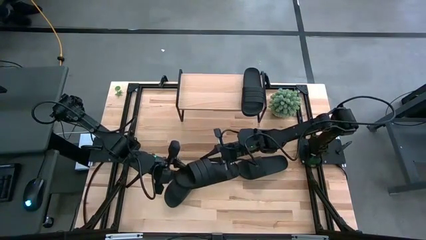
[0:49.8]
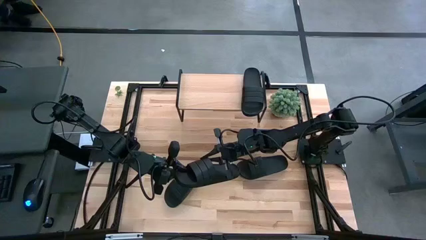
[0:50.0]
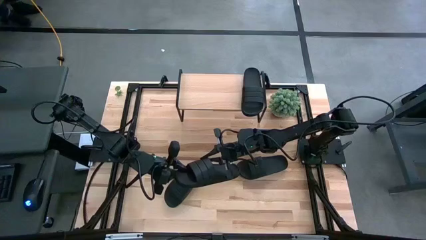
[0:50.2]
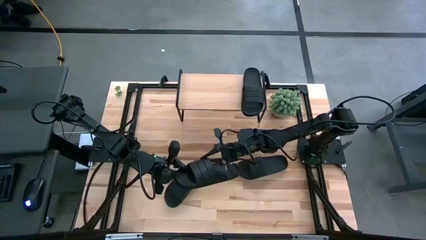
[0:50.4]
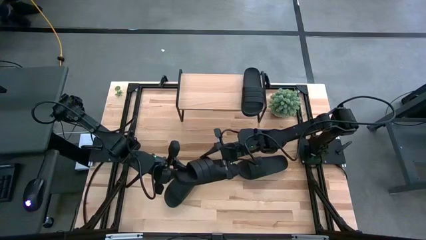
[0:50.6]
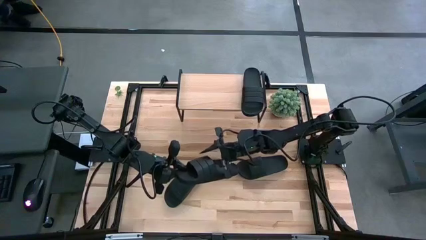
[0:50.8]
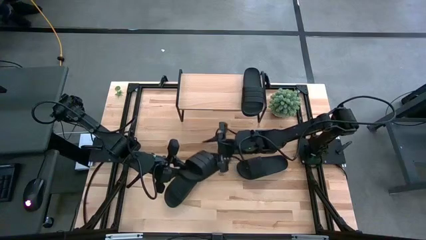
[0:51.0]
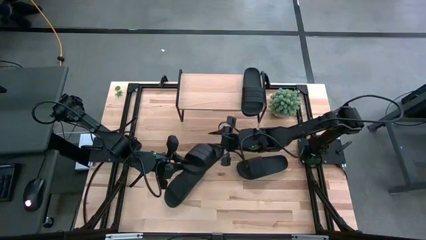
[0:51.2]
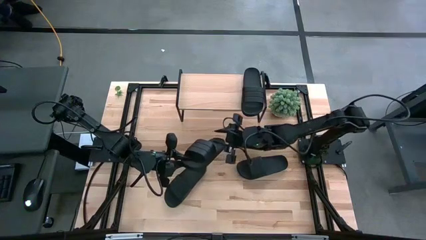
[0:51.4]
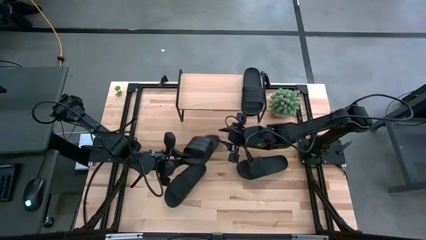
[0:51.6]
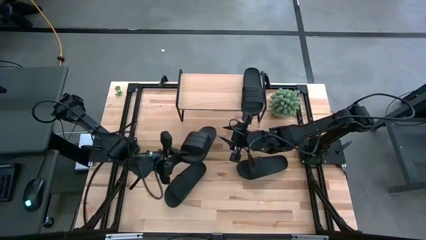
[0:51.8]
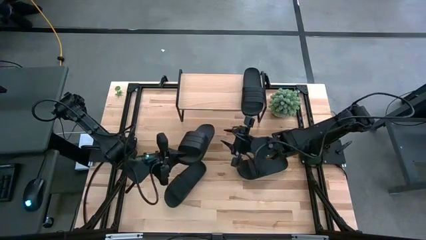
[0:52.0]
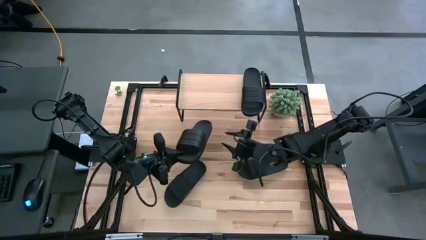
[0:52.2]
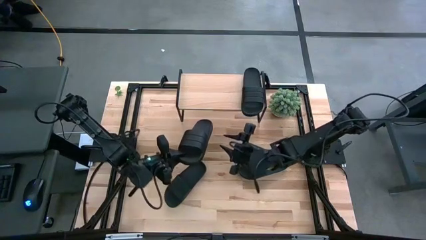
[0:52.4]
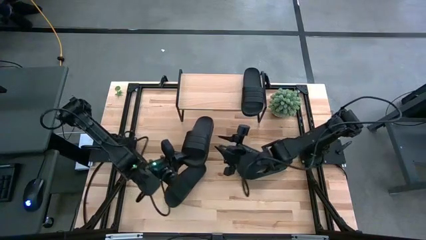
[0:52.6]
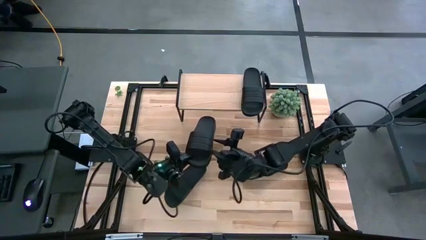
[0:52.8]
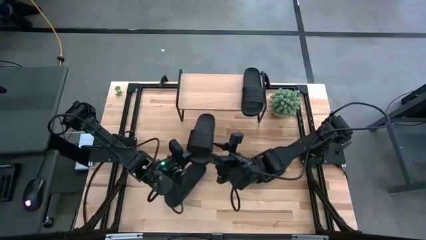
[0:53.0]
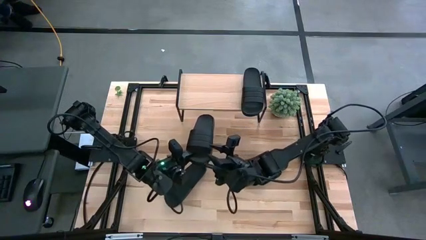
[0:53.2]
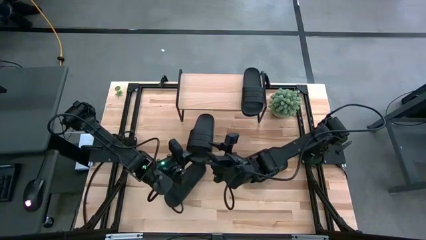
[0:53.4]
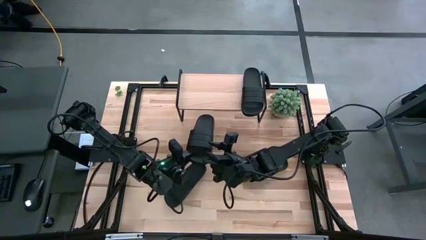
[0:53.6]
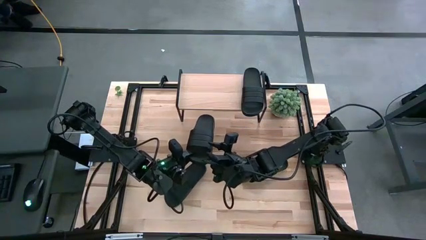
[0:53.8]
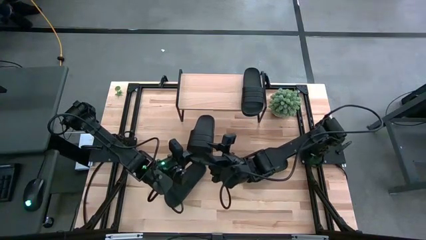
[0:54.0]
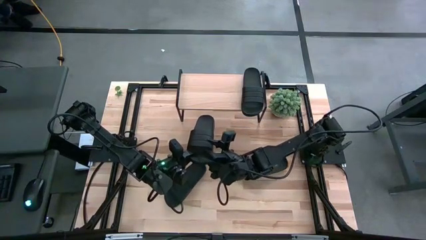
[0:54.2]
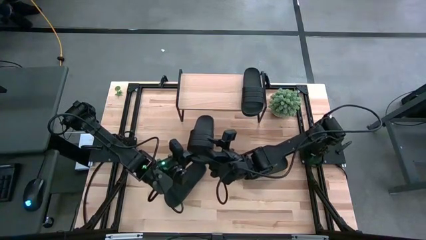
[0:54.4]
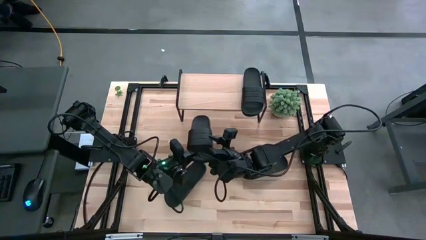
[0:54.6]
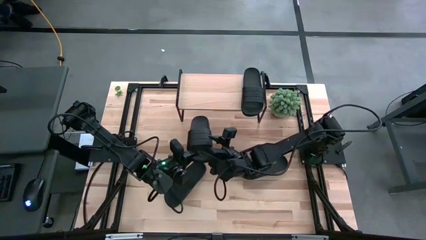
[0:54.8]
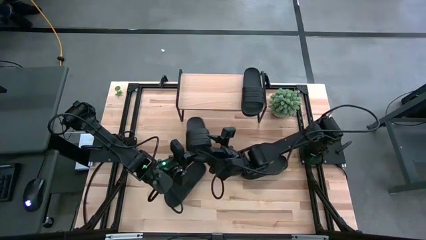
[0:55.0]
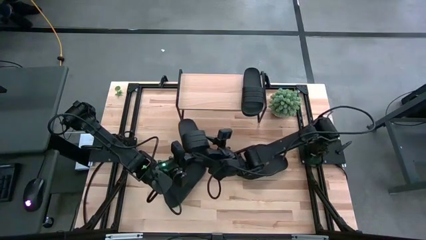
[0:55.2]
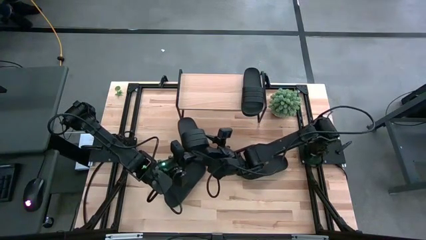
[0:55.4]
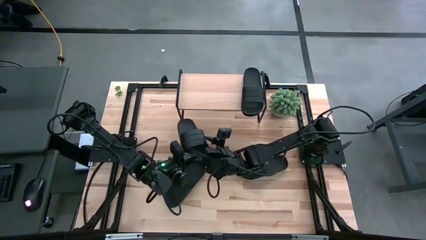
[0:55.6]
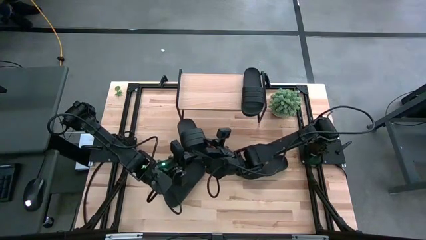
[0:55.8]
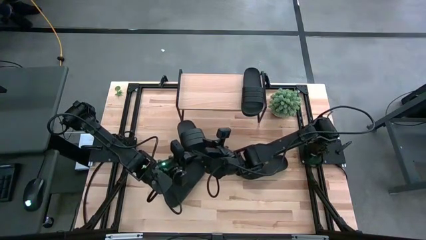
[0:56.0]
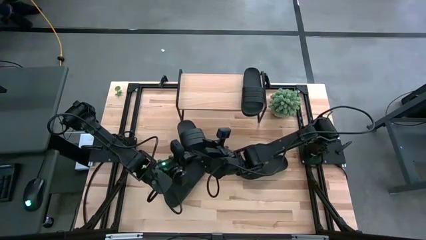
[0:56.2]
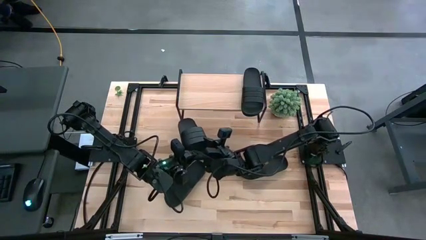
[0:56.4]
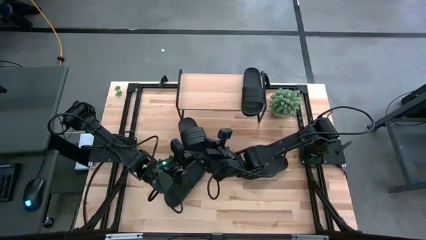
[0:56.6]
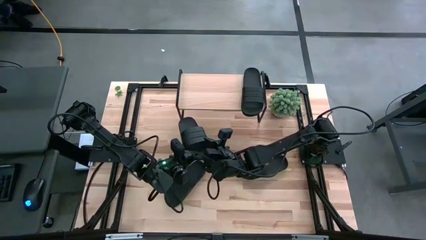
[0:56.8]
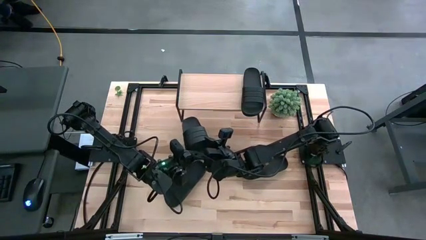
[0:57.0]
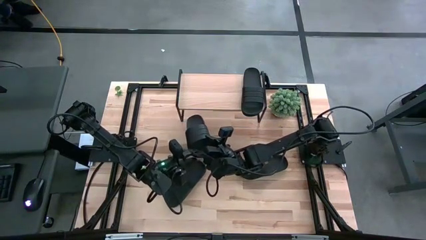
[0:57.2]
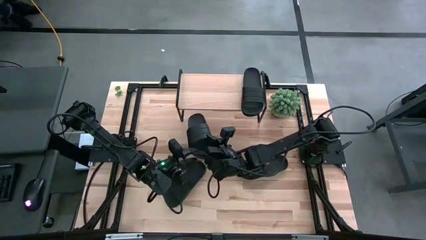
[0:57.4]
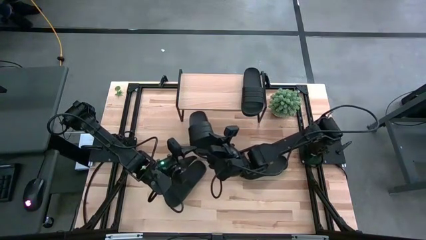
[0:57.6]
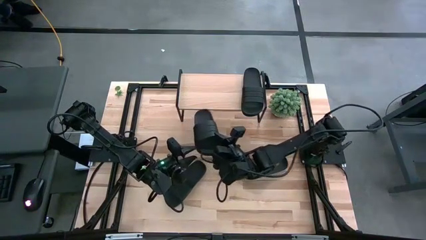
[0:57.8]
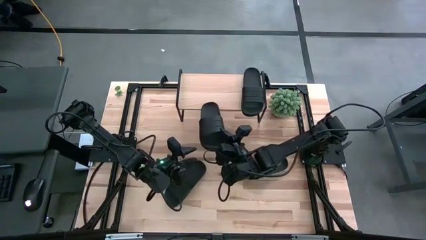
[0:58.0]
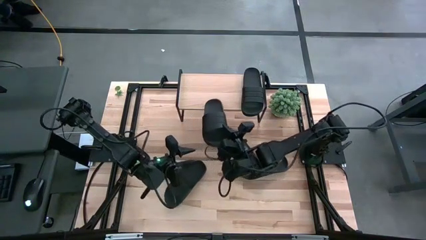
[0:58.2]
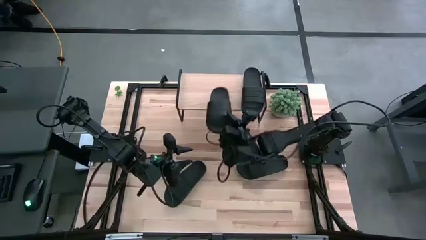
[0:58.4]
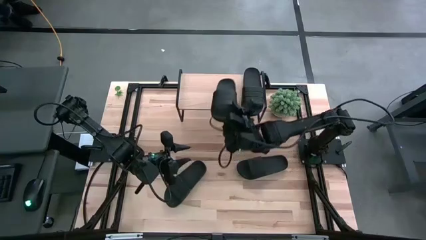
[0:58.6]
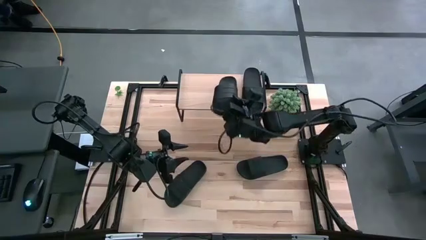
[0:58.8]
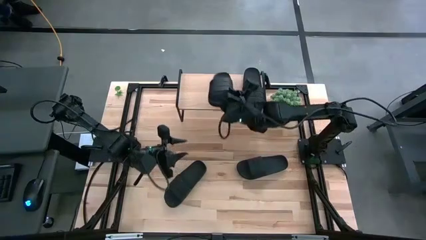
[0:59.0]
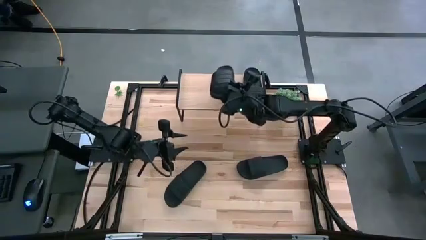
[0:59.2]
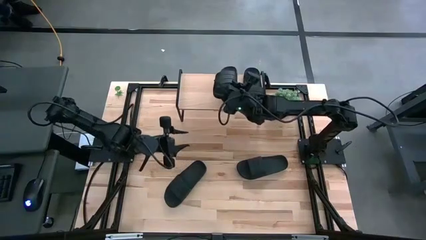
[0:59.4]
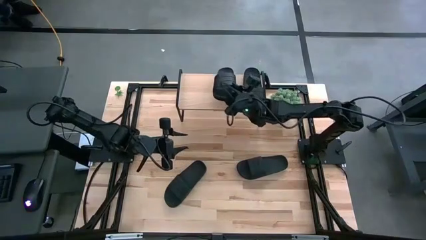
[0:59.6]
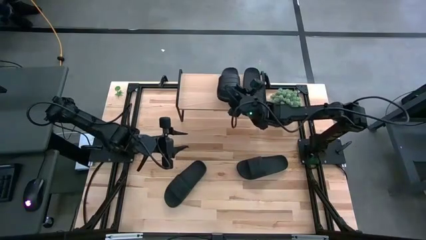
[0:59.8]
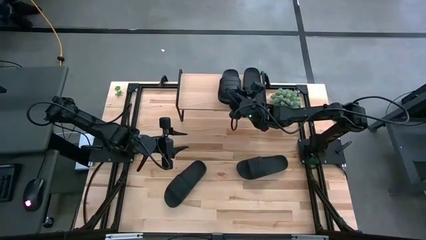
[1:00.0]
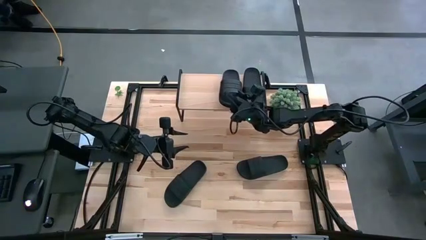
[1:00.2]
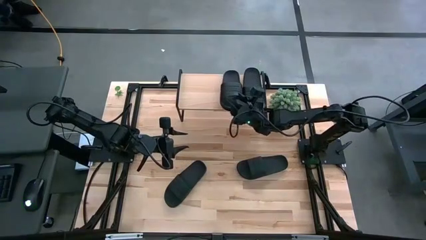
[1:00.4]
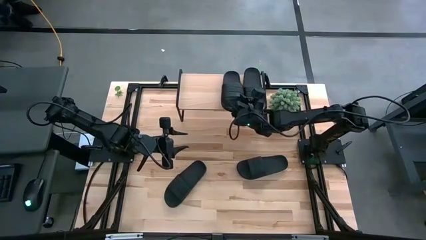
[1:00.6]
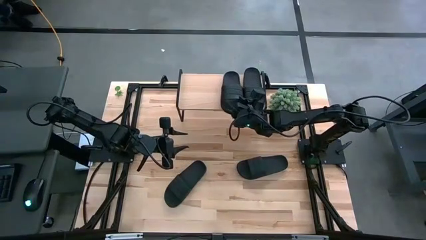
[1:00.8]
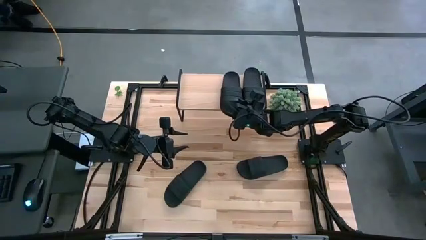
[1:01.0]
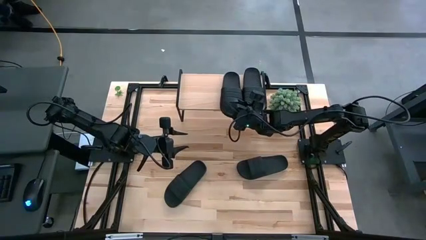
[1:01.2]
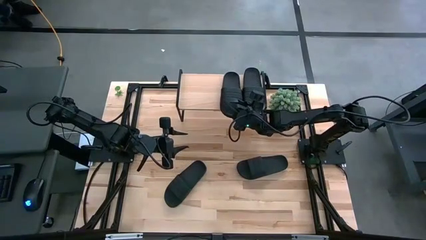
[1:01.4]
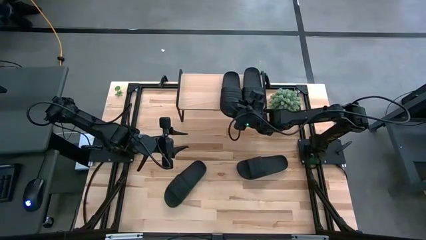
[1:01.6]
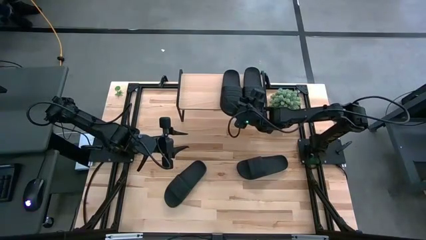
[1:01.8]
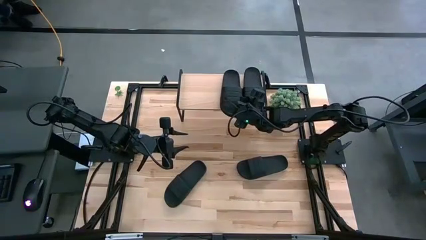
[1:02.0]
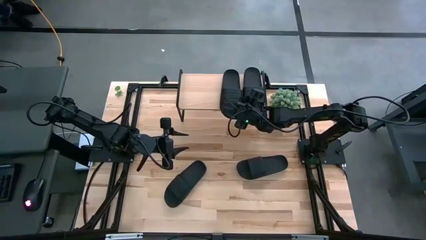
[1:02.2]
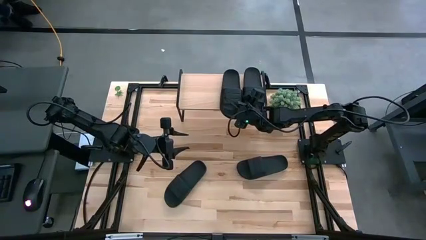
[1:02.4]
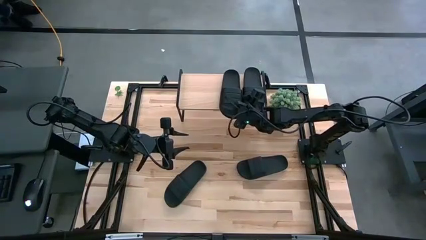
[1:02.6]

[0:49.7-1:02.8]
Task: Pick and place slides into the shelf
Put the black slipper on the shelf

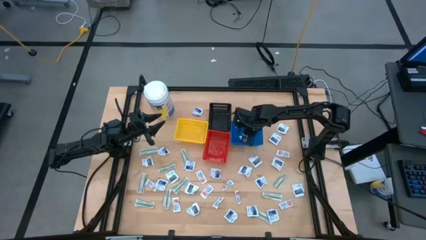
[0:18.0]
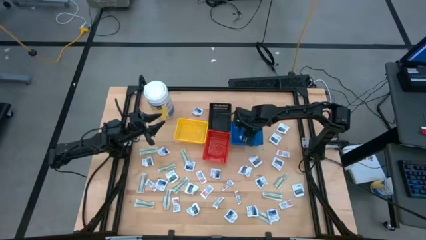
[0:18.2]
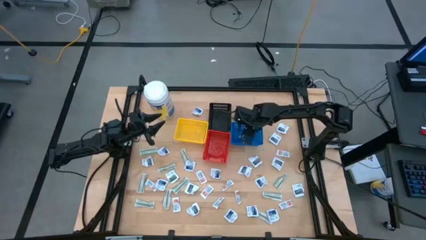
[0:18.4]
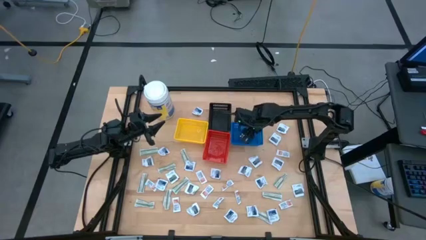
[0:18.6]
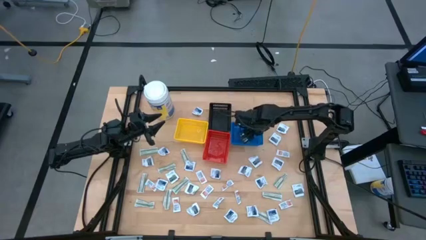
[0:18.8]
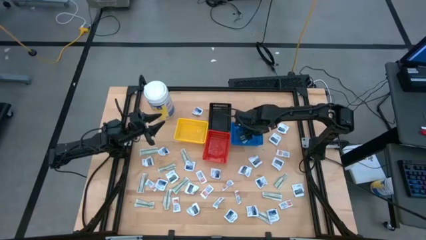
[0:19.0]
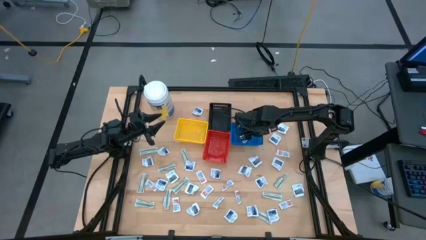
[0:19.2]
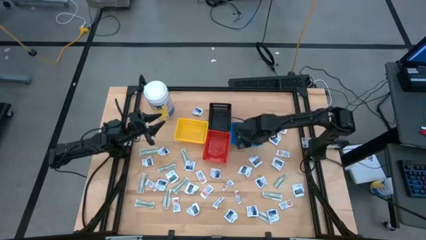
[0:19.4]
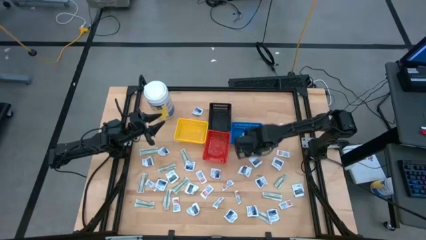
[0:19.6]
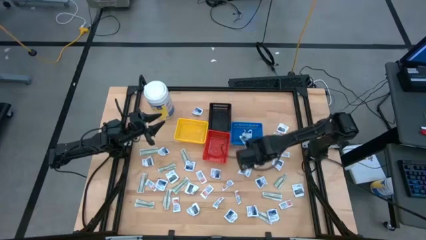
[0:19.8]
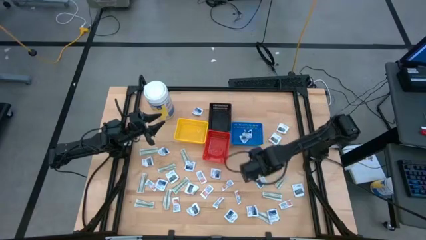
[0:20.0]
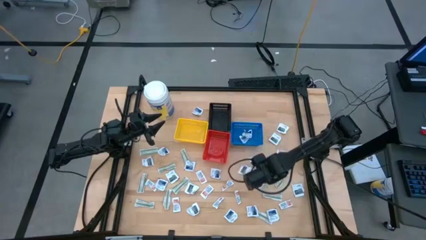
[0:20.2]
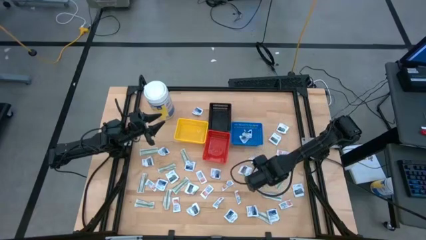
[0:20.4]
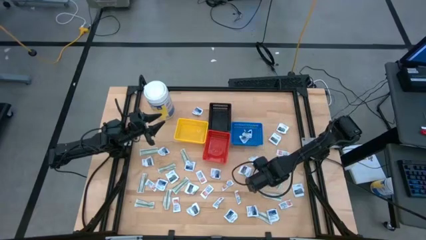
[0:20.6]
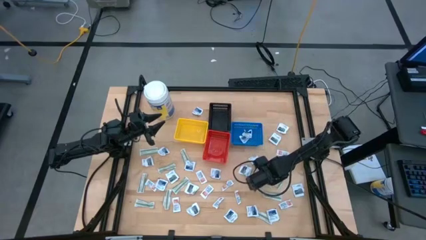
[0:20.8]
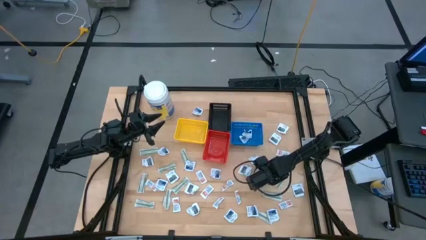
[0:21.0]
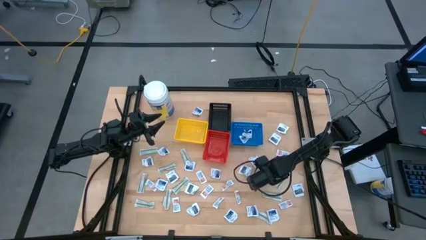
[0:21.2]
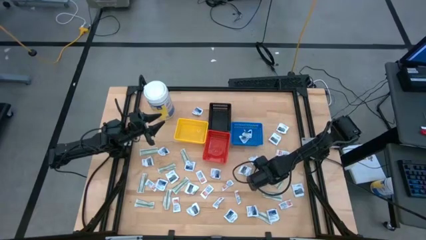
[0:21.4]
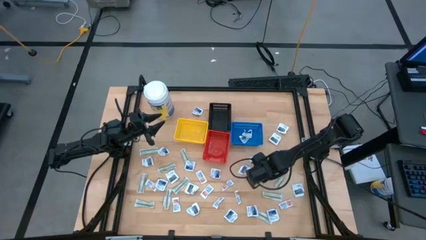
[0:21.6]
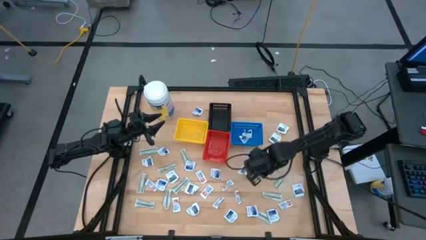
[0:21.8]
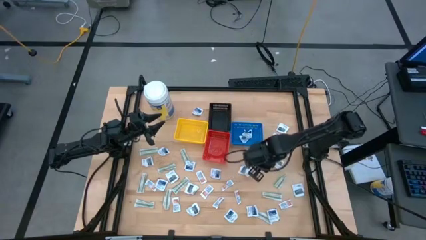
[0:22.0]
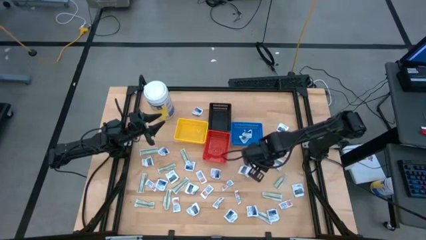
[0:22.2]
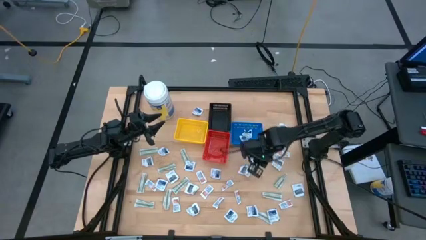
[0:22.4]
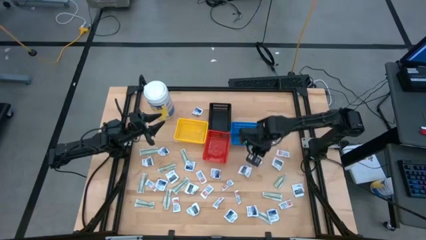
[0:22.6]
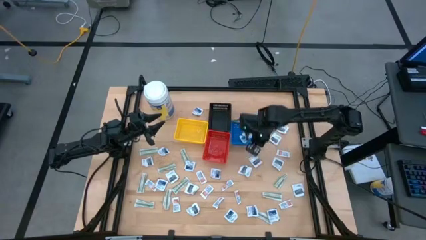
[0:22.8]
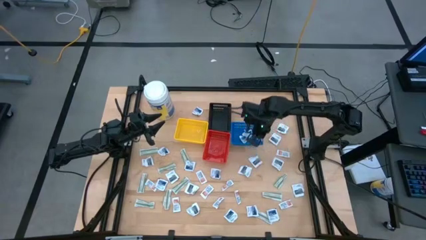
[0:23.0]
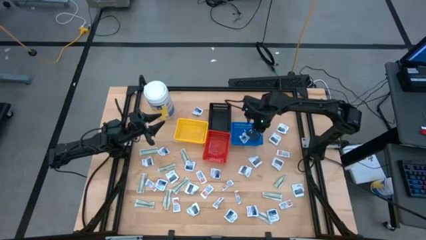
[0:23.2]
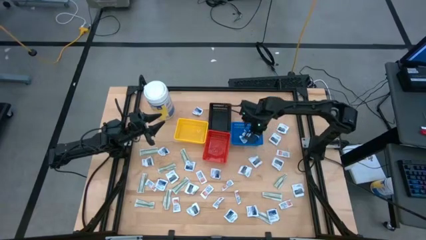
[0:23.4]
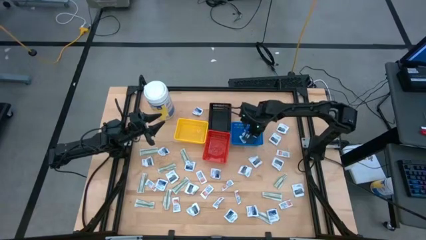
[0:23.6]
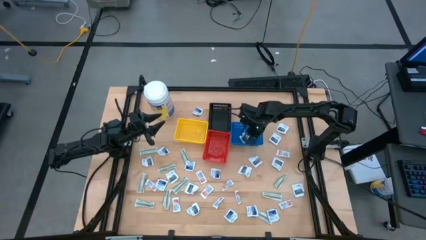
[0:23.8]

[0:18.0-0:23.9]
Task: Pick & Place First Aid Supplies
Put the alcohol pad into the blue bin
